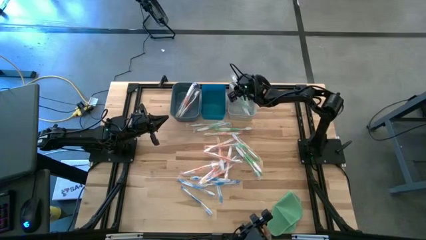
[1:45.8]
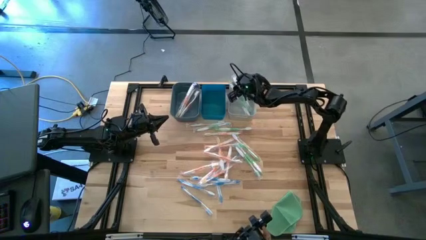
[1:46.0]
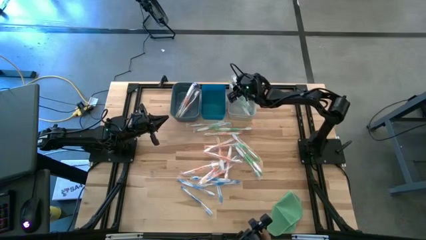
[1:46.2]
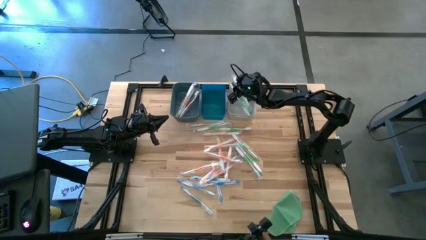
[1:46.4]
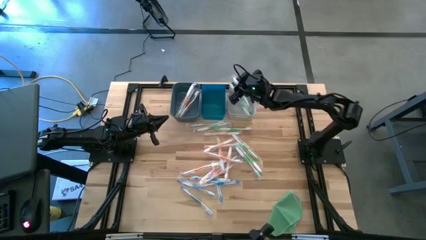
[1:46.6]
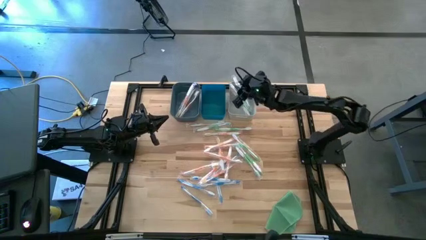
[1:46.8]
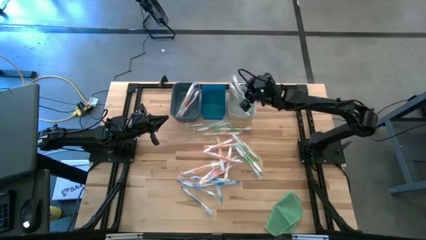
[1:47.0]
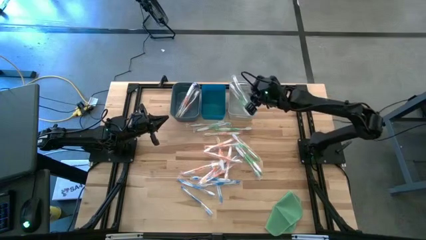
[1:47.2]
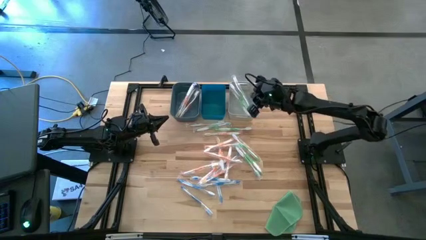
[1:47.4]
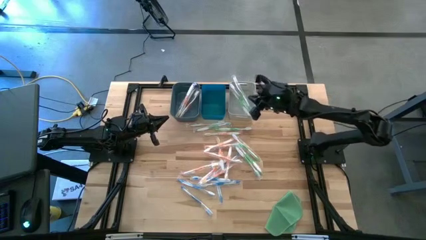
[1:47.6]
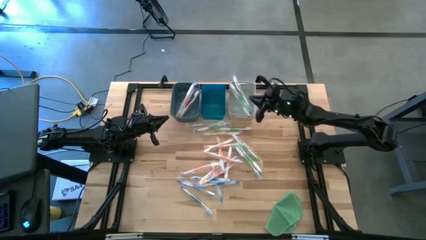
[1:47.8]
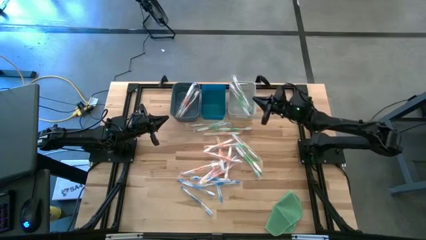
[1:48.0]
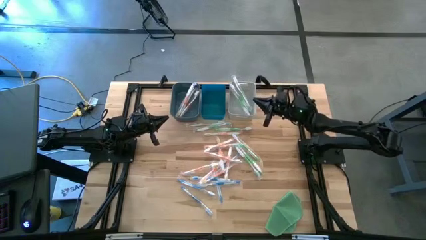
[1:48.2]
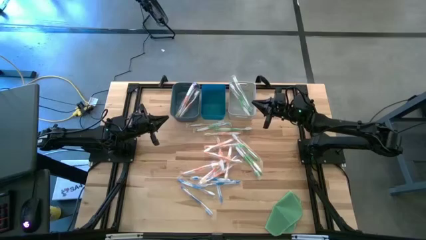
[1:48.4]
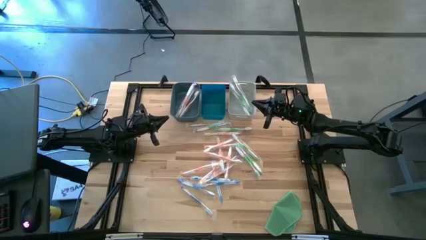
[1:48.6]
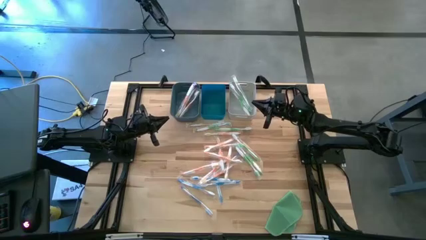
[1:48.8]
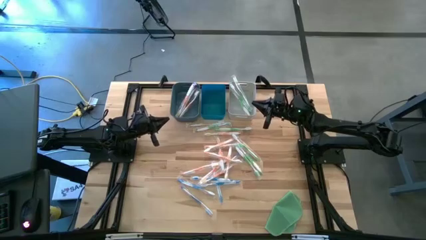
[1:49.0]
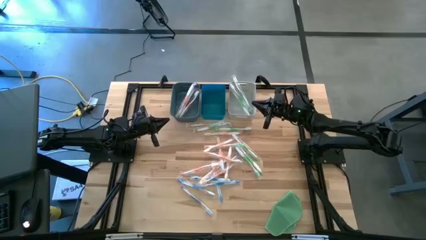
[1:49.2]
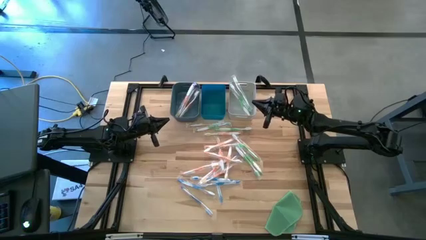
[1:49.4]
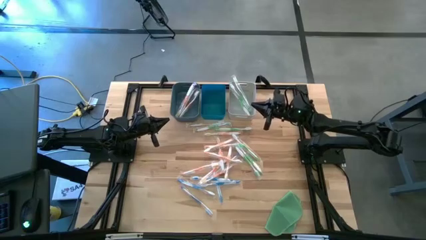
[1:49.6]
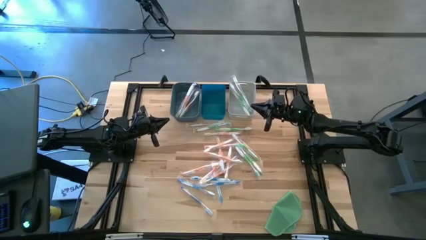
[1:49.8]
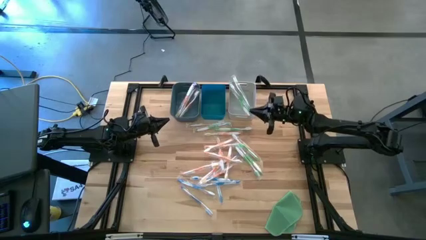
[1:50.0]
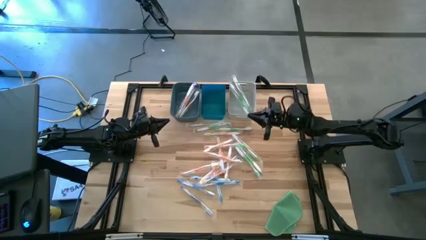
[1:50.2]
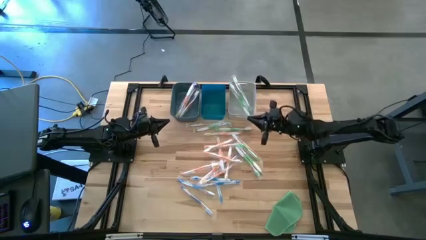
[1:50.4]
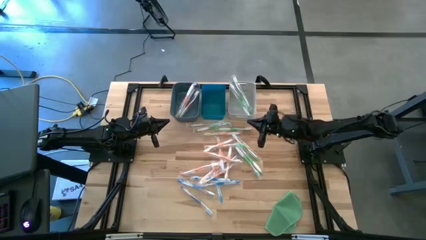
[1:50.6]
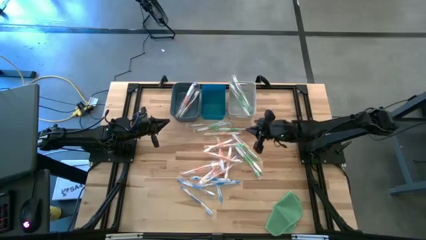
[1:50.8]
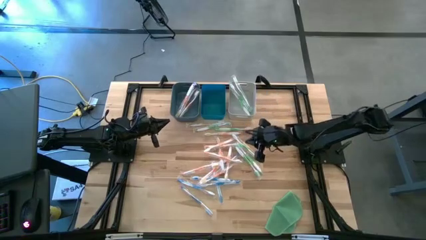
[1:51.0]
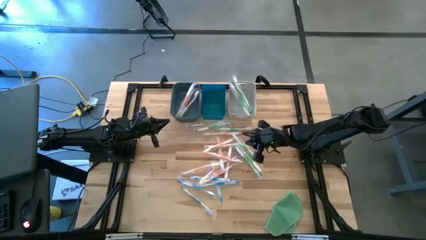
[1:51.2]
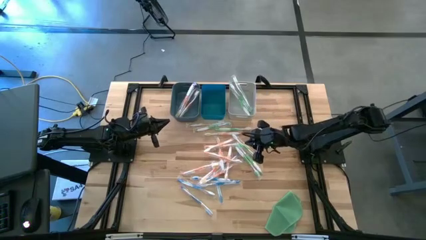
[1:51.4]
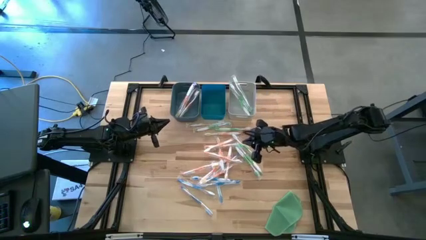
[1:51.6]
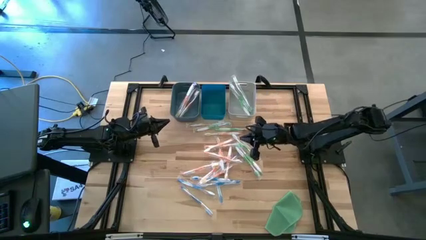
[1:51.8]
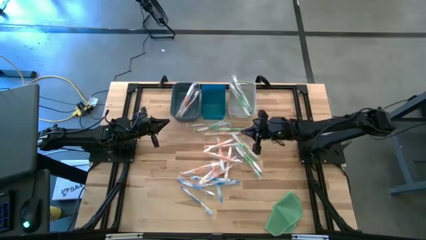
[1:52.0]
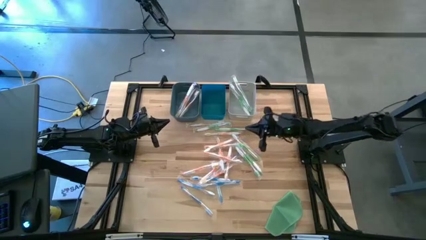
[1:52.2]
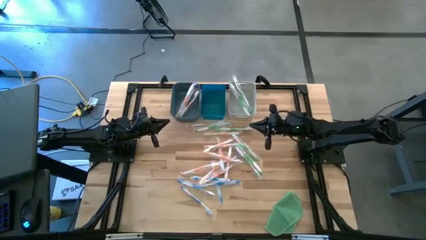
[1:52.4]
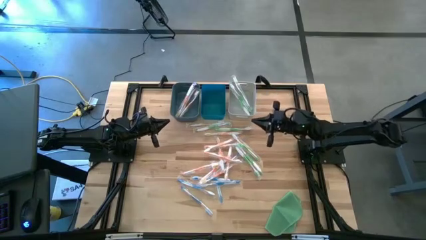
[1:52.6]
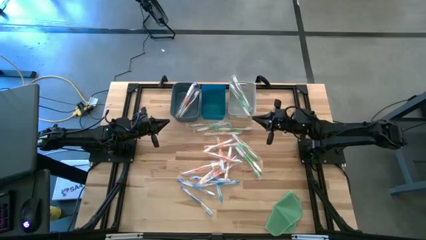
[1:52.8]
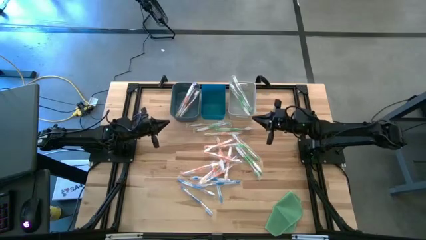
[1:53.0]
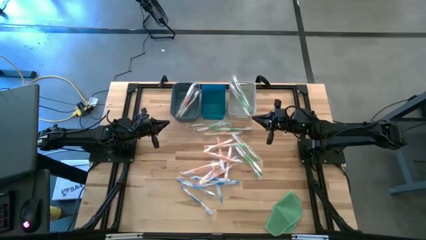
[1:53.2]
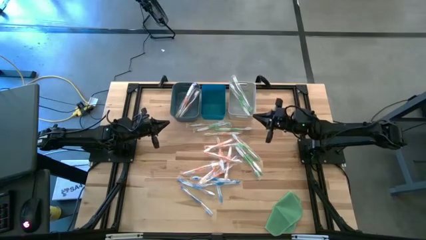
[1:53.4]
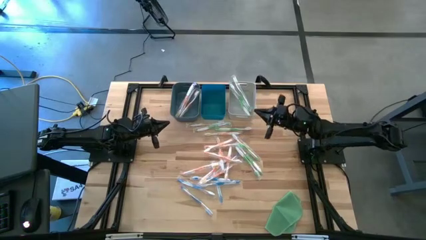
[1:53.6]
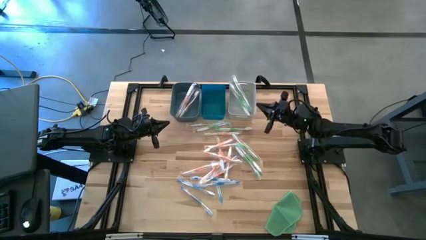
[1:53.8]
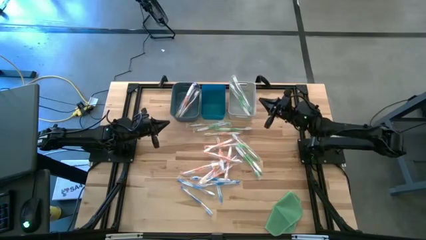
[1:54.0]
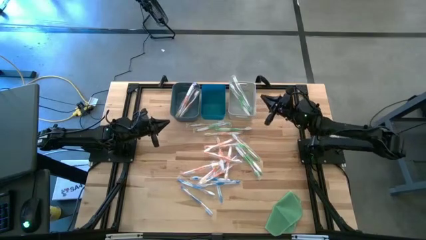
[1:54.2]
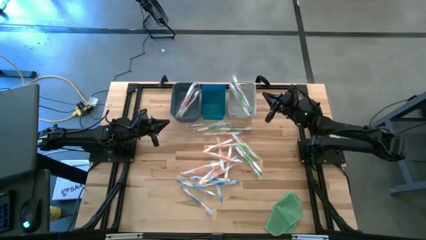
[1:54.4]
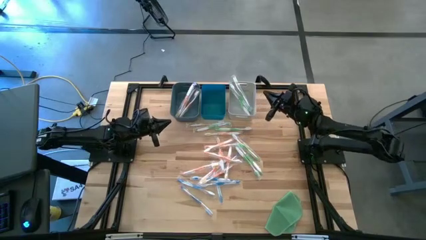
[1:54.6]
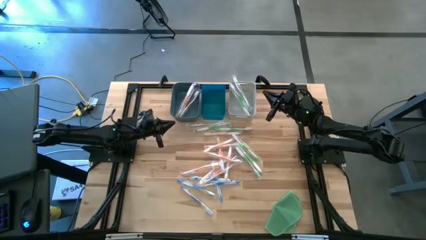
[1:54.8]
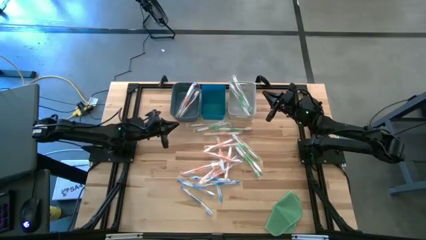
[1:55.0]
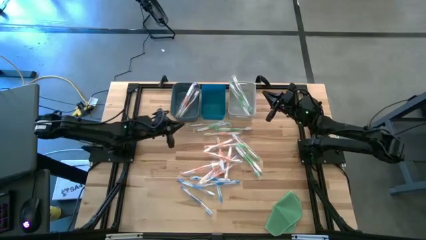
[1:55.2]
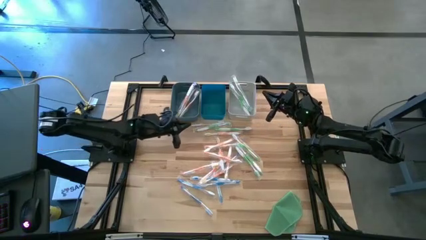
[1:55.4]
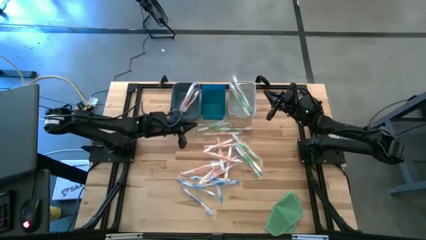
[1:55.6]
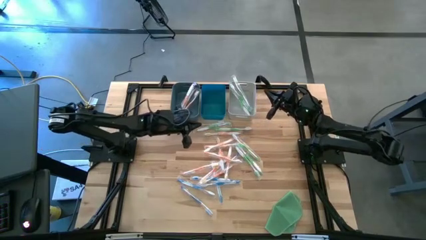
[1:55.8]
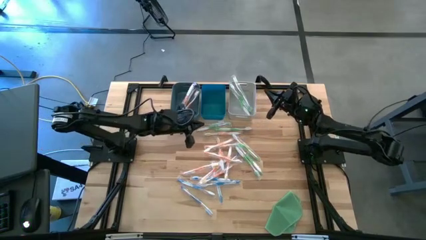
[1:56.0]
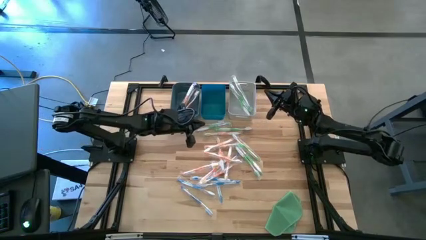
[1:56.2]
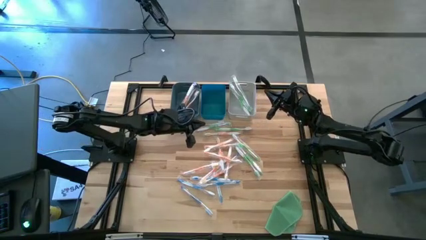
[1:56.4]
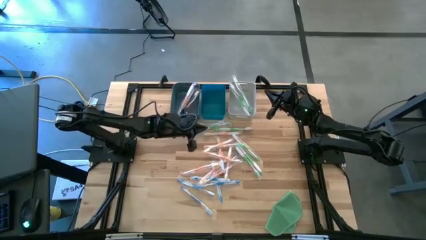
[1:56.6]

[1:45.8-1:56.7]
Task: Pick & Place Toothbrushes
Put the orange toothbrush into the dark blue bin

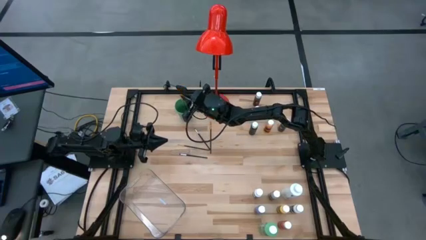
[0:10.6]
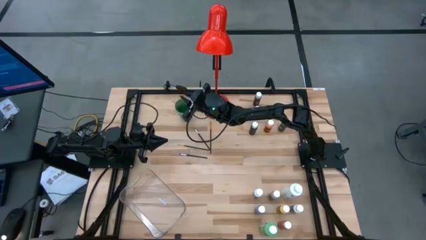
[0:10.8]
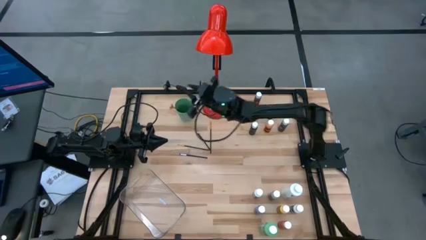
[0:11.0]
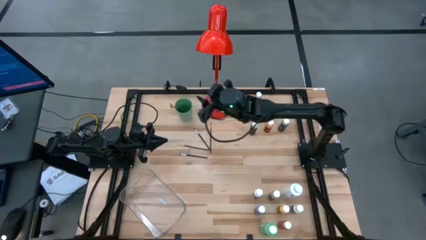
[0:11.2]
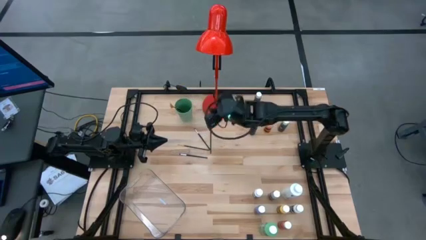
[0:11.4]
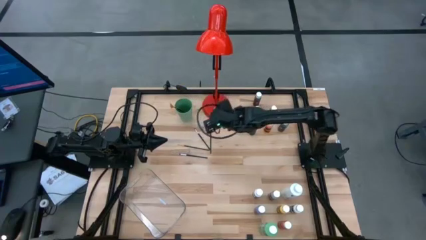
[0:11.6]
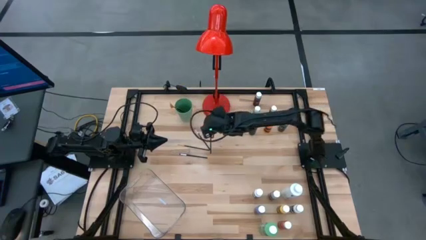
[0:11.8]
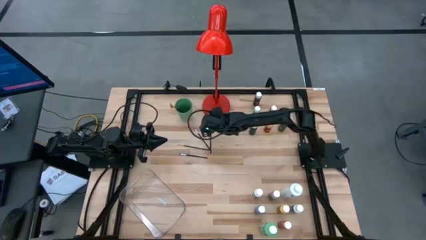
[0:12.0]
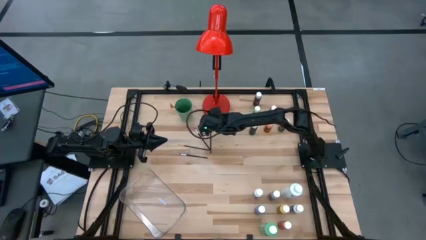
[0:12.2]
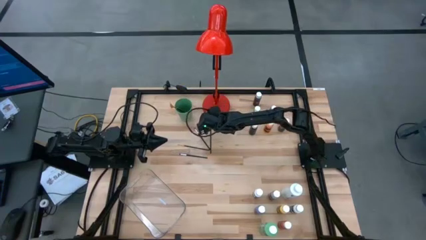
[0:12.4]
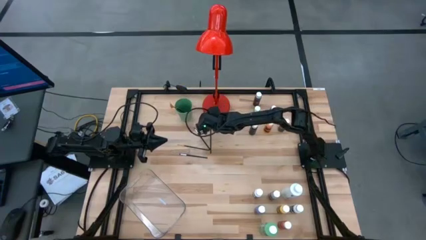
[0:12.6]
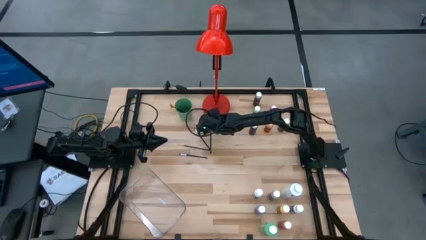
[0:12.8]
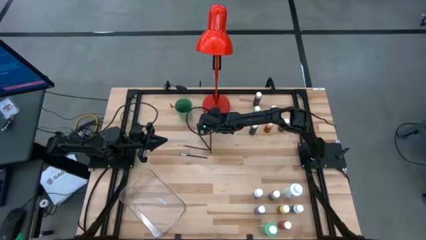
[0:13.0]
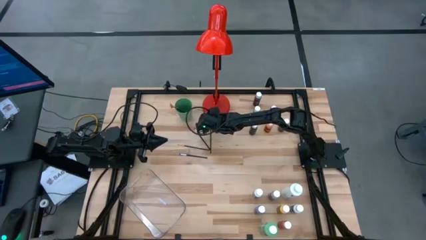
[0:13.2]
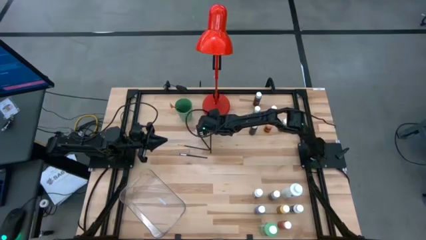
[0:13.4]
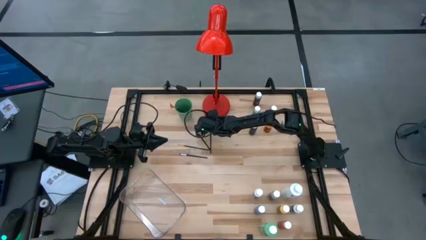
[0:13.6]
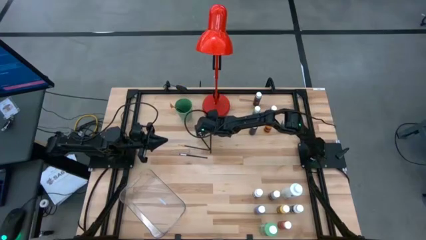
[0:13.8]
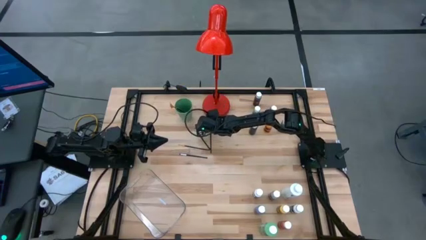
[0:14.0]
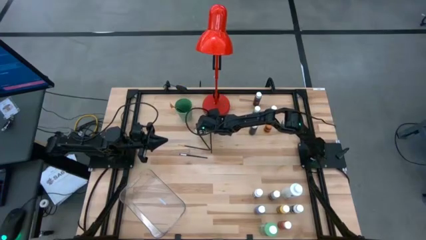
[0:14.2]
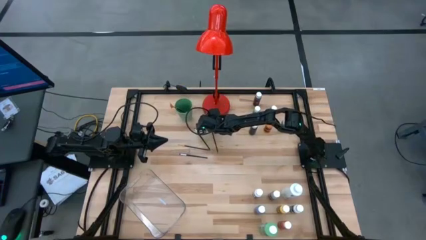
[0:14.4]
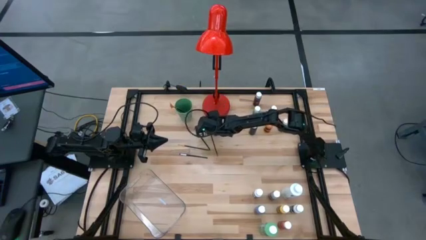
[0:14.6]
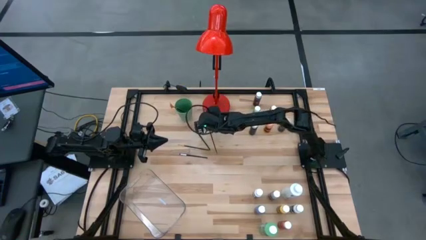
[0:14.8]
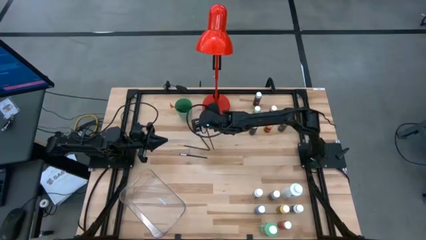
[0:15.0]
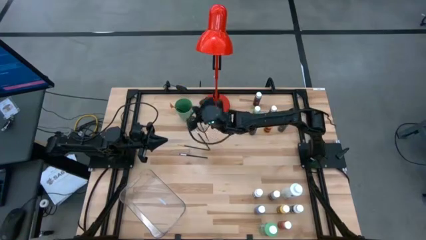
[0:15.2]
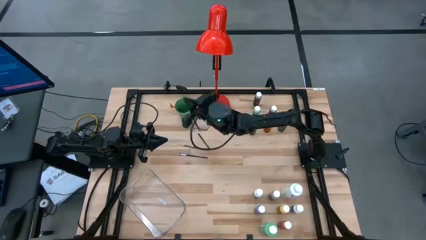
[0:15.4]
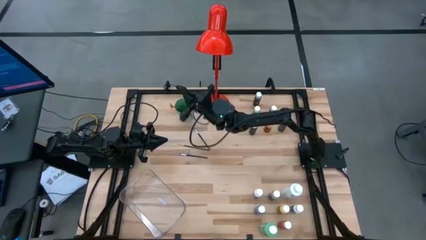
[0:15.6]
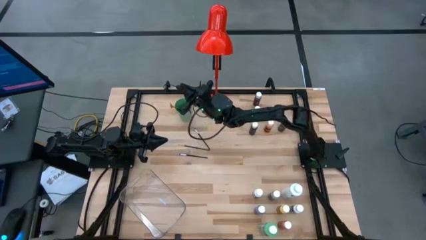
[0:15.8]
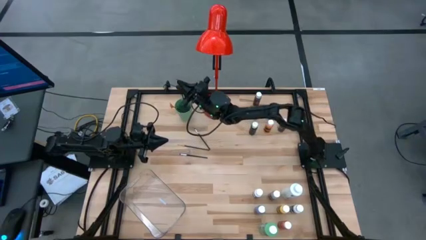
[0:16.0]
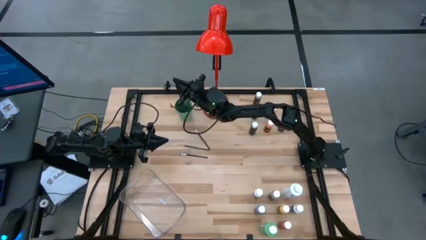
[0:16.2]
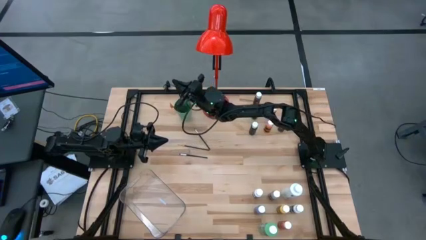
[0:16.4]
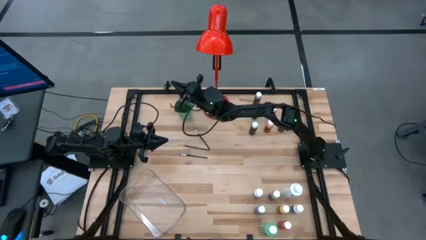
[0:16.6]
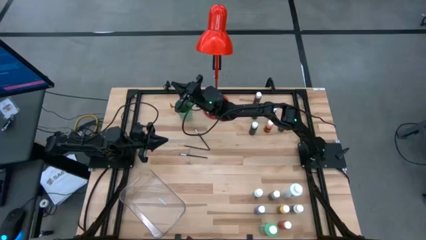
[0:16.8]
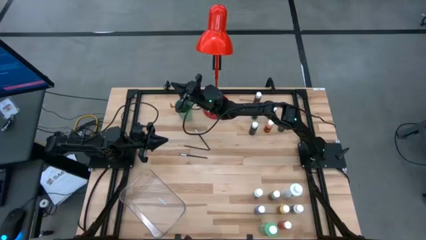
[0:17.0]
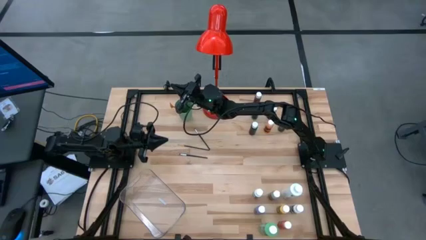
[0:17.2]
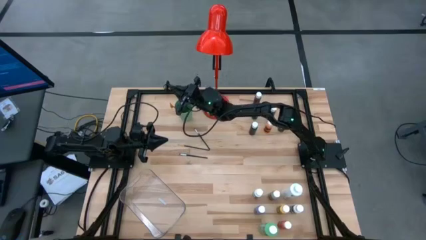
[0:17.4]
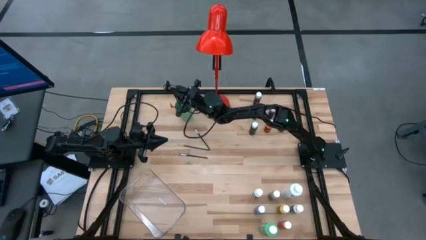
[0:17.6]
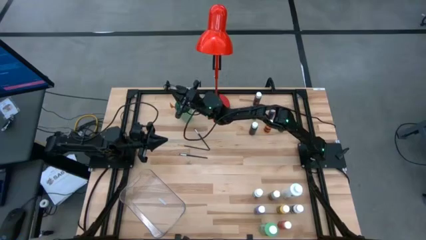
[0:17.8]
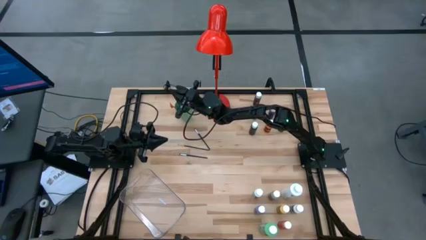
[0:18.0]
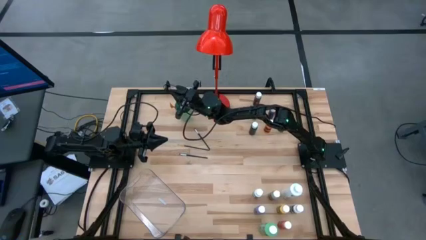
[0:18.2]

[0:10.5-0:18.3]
Task: Pick & Place Paint Supplies
Put the orange paint brush into the green cup
